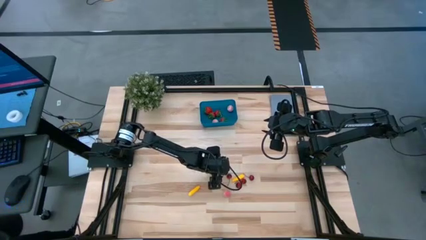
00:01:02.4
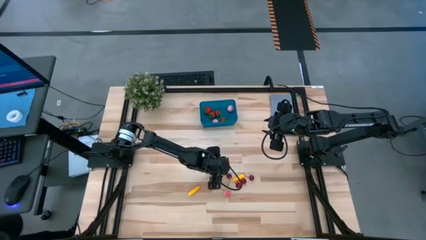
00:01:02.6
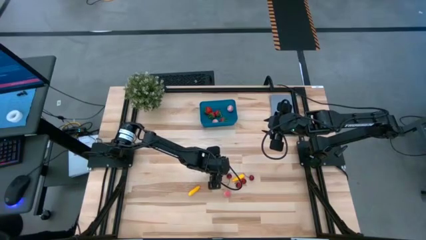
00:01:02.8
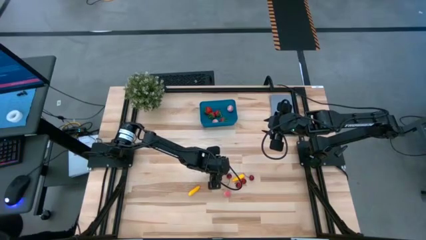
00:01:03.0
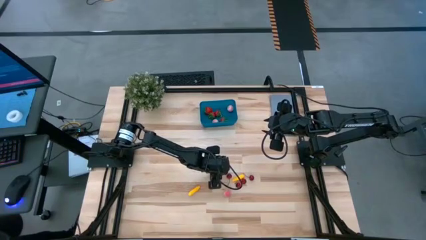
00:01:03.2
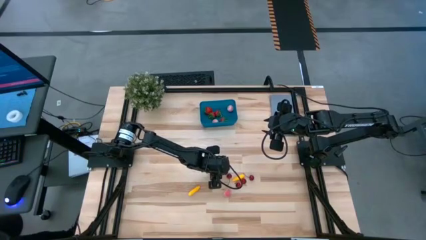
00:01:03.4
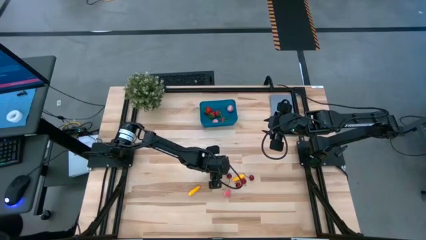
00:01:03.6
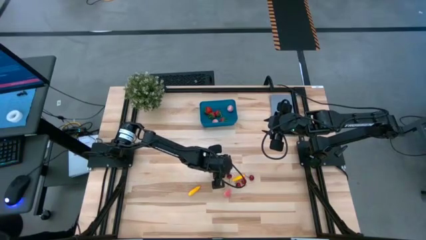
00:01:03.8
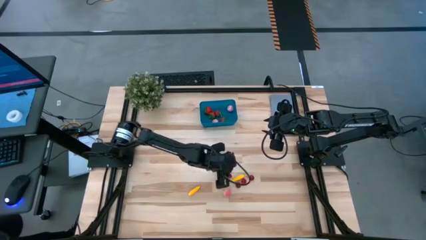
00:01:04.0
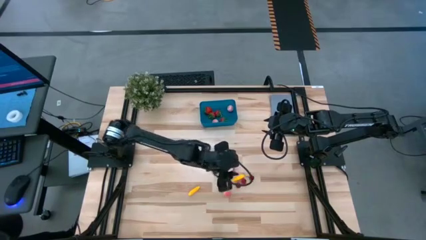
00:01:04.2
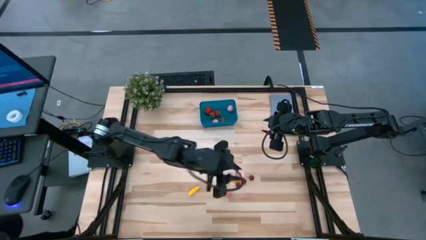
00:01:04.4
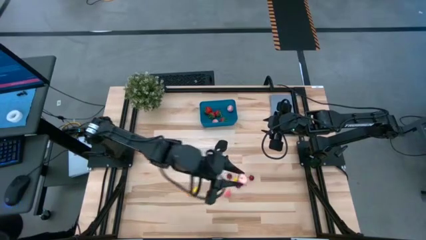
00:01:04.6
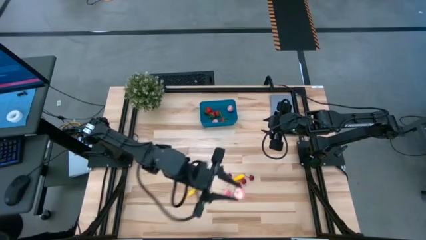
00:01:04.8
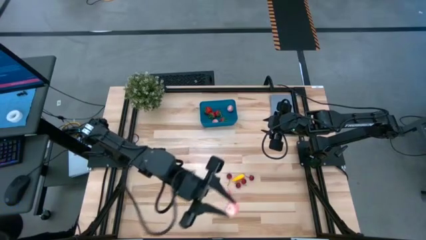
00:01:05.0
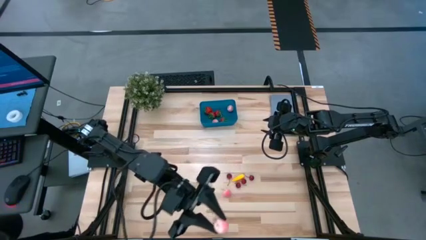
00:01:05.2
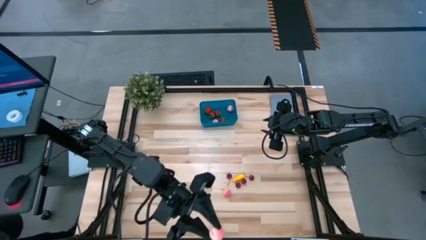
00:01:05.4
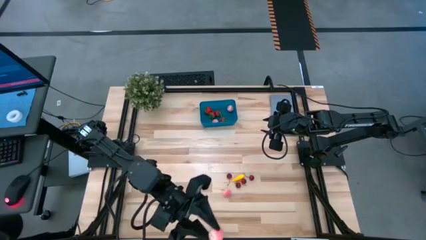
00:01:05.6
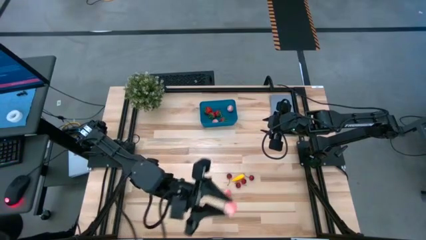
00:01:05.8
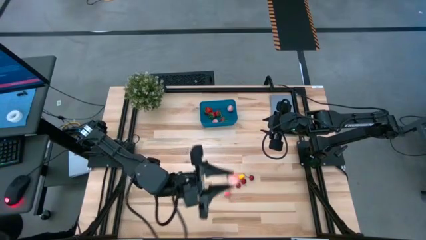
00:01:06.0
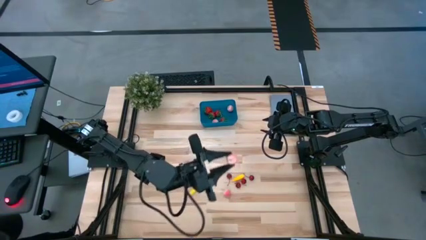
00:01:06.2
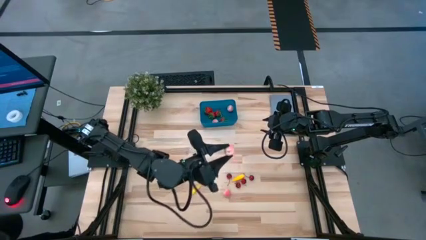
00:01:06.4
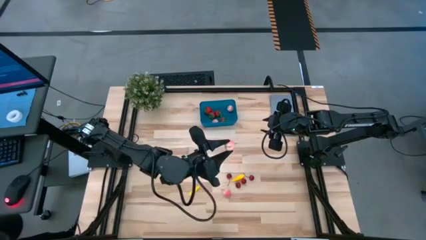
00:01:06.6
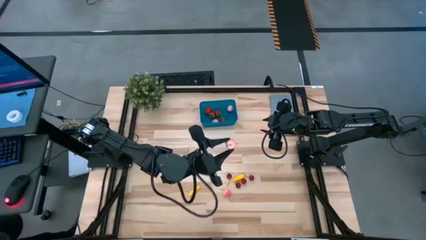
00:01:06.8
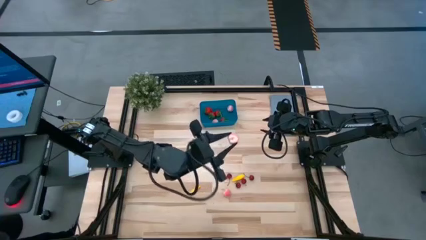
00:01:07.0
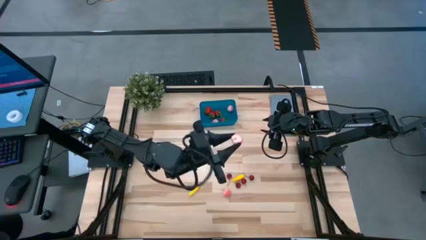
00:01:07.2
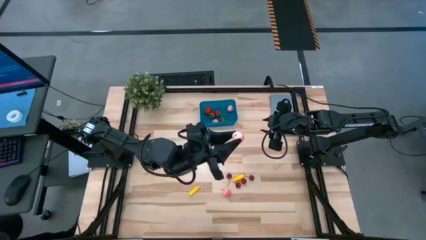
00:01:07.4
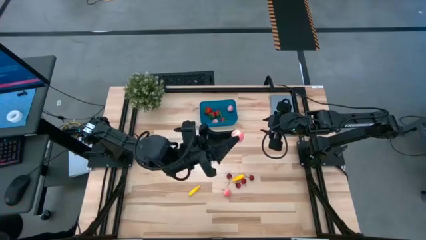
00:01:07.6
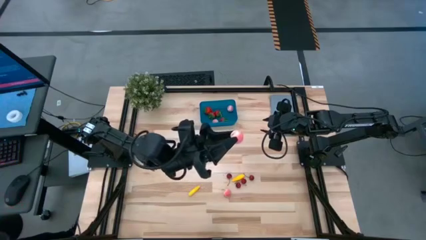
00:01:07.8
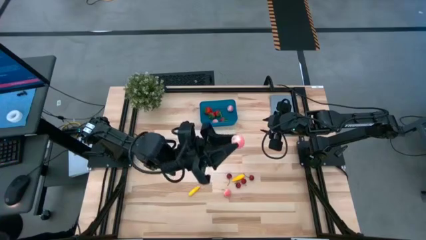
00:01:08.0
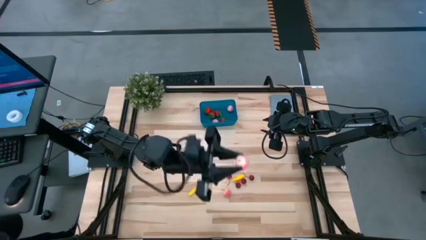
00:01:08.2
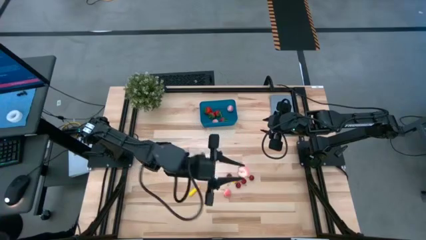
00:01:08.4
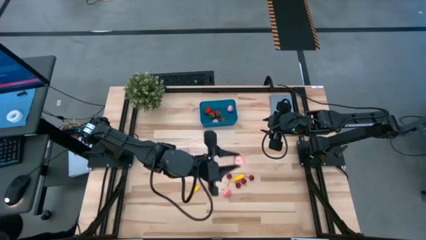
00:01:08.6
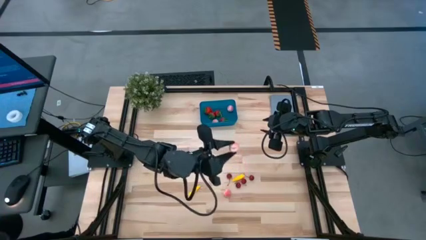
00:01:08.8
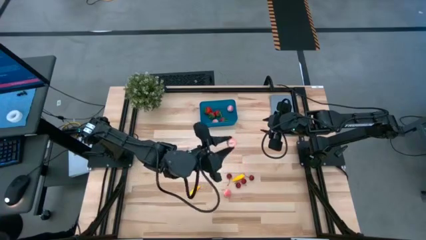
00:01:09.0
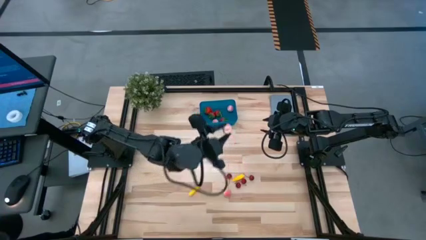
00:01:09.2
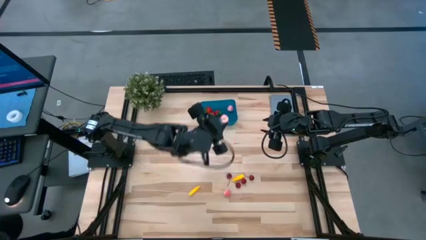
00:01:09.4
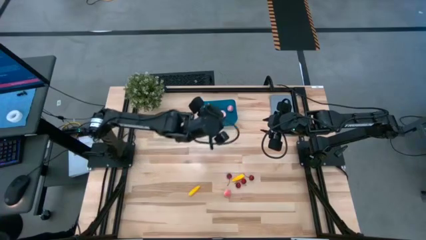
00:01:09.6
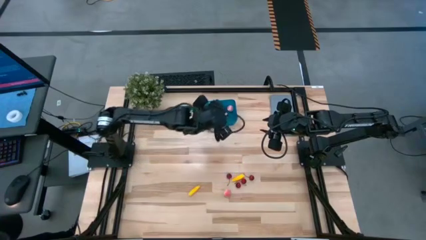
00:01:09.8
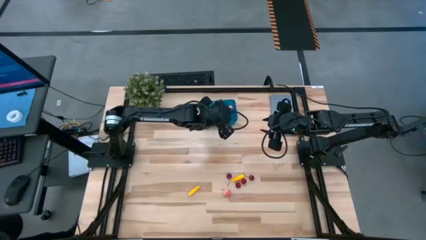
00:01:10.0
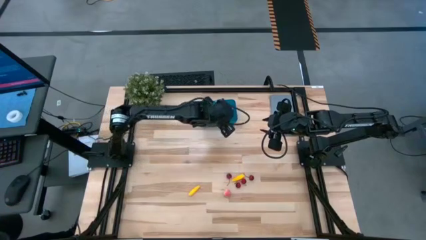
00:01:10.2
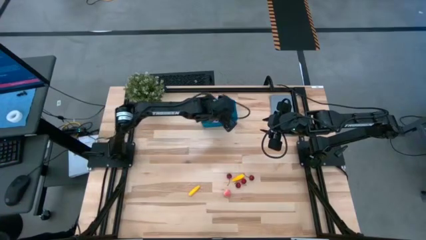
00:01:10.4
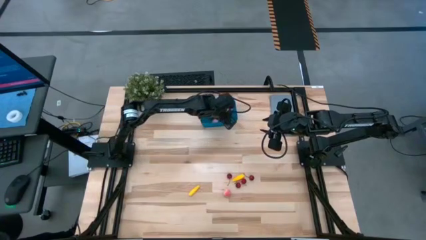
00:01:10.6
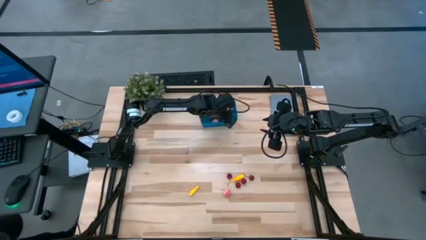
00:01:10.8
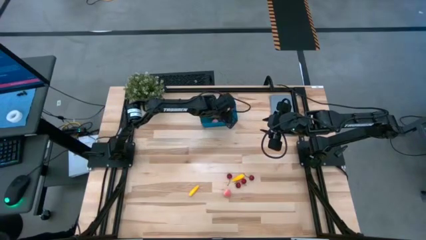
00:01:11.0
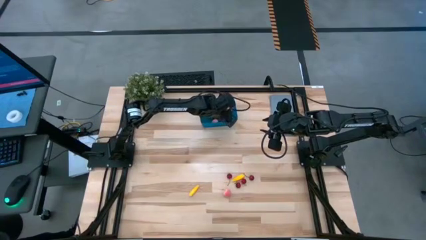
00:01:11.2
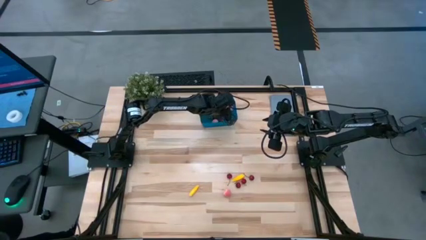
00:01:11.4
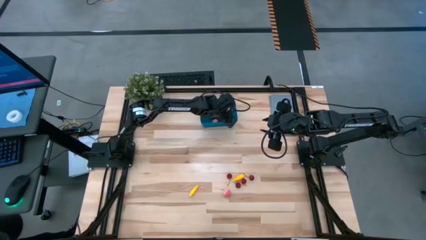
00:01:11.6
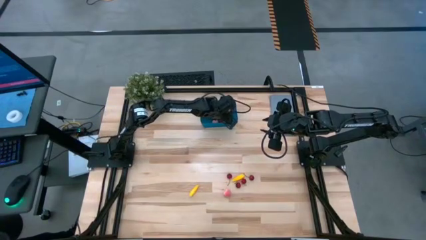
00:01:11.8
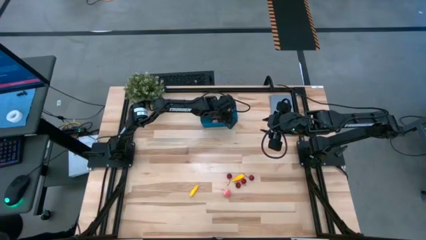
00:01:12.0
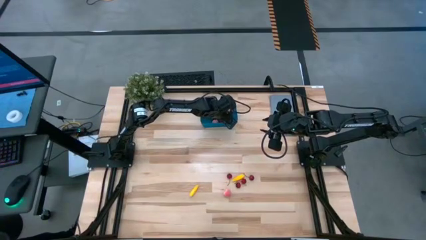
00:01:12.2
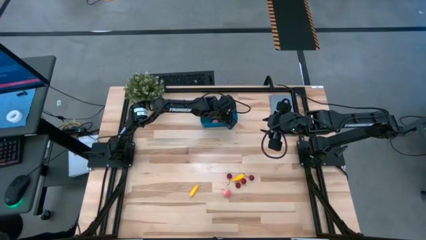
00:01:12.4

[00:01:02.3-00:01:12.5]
Task: Pick and placing Produce into tupperware
Put the top peach into the blue bin

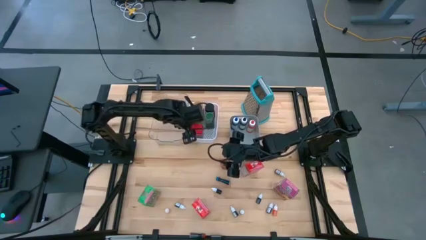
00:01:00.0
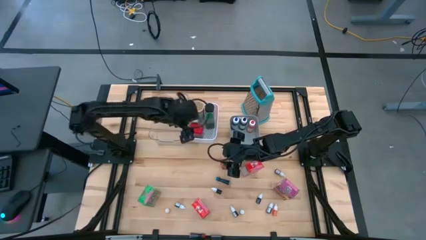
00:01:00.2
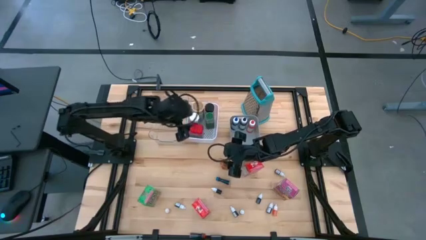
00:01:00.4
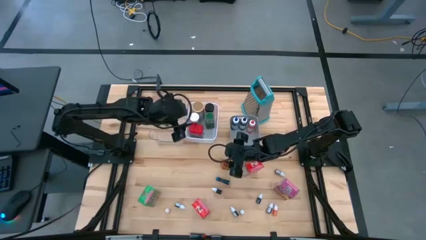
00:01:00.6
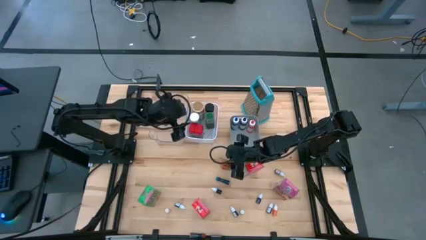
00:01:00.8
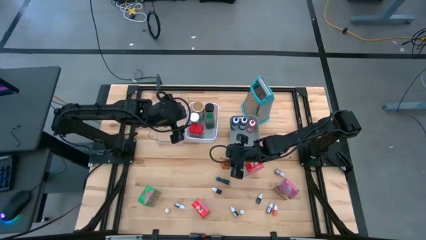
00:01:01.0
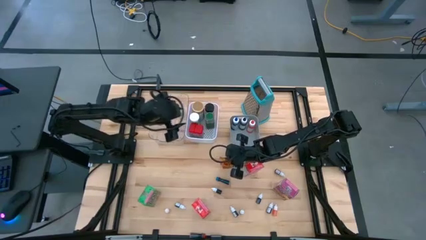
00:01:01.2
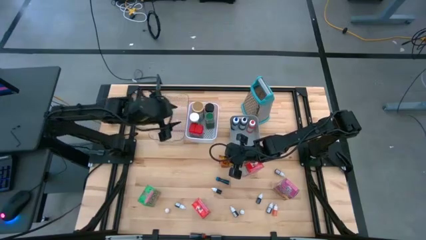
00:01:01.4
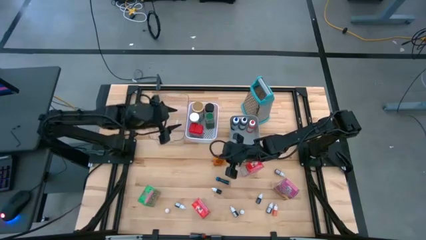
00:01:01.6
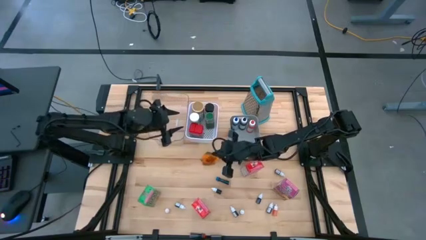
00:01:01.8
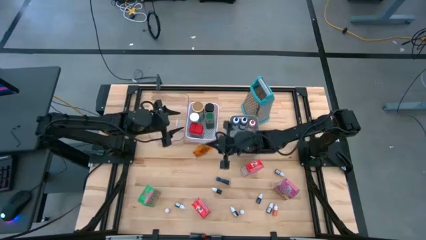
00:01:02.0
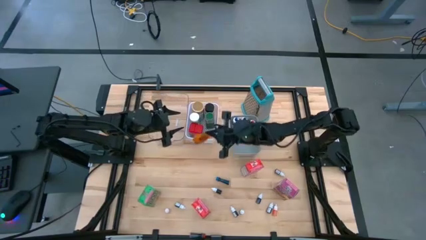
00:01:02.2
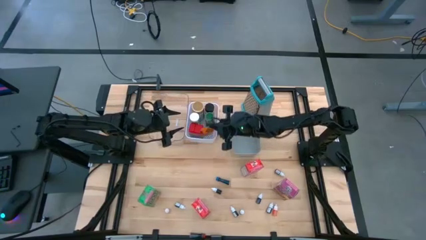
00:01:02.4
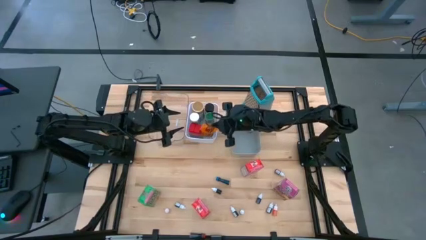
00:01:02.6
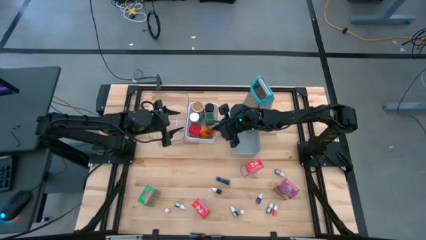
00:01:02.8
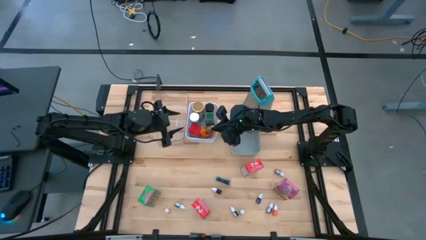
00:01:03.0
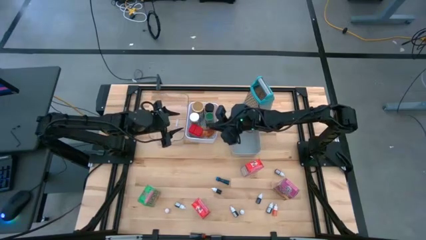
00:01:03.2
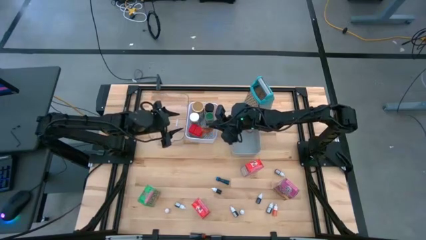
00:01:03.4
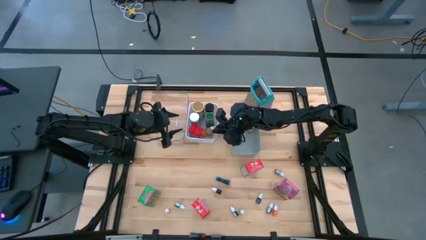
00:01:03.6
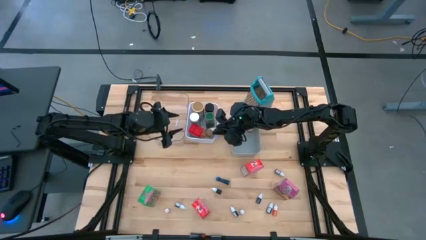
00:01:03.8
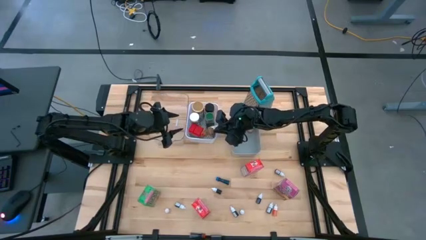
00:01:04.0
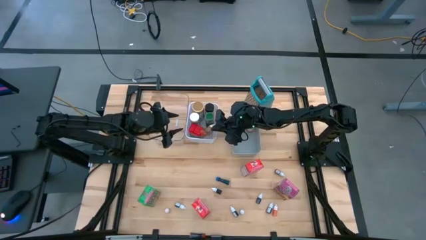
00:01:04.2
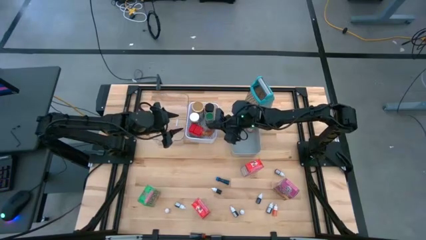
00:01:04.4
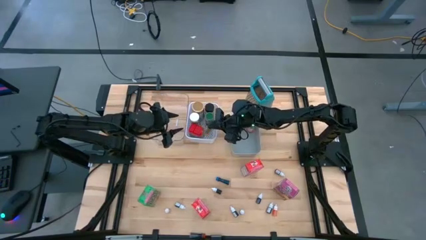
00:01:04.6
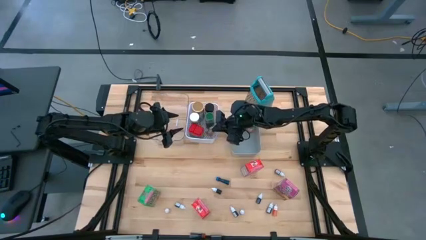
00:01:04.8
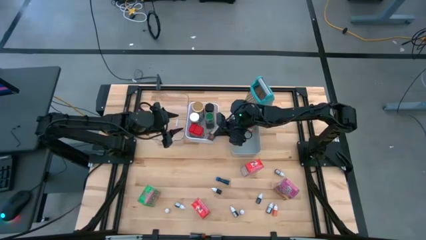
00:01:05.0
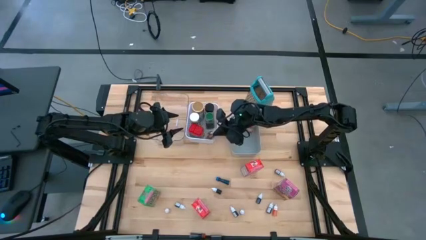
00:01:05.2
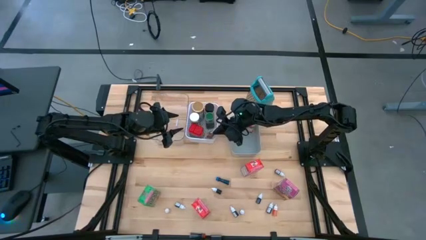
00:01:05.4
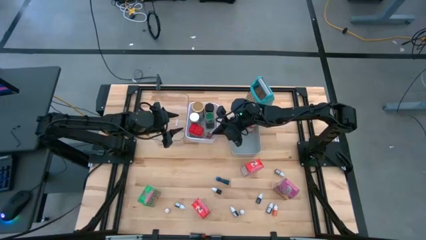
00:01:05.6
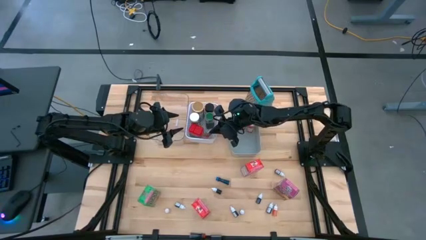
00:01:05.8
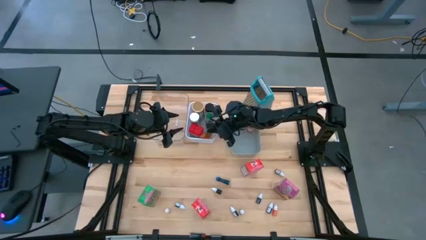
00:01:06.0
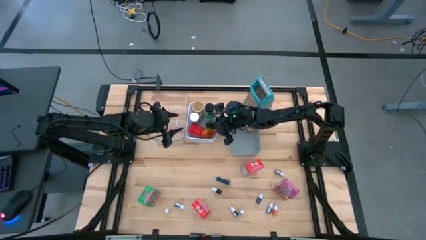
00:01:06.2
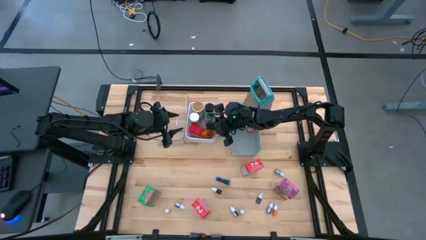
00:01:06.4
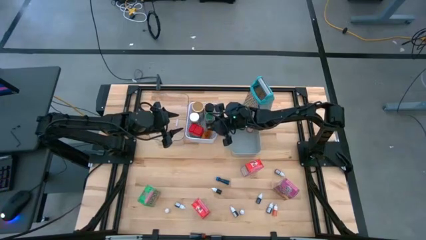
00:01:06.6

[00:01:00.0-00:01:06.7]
Task: Pick & Place Kitchen Items
Put the orange seasoning pack into the white basket
